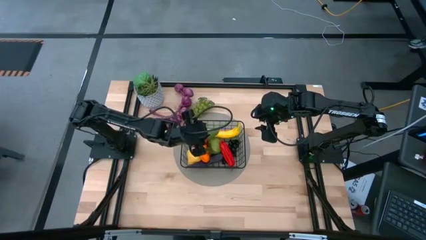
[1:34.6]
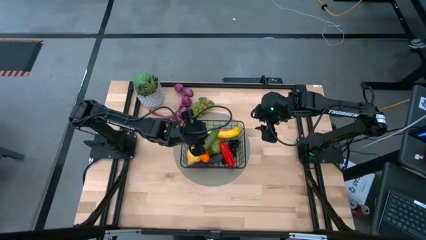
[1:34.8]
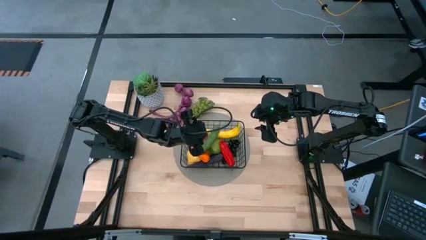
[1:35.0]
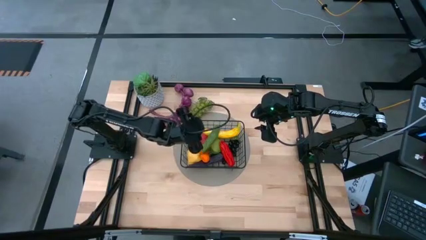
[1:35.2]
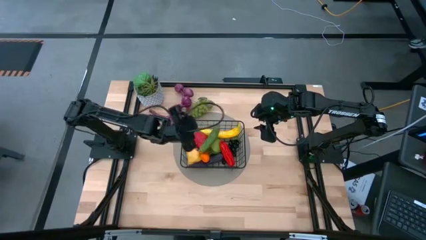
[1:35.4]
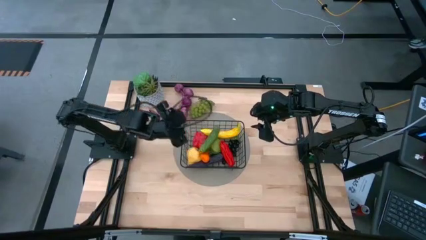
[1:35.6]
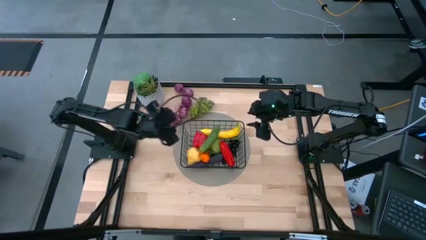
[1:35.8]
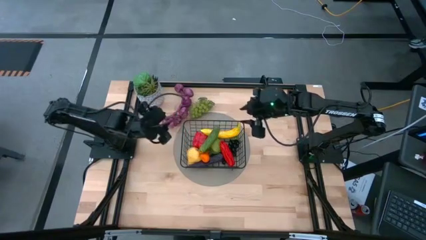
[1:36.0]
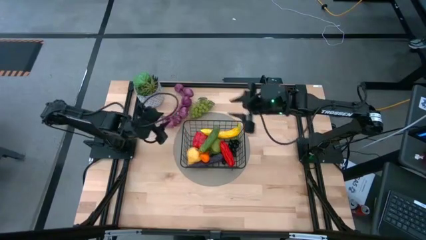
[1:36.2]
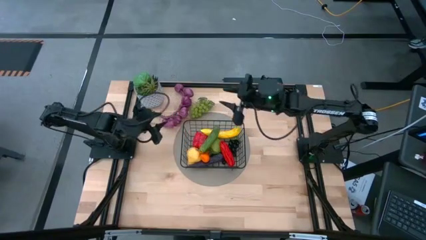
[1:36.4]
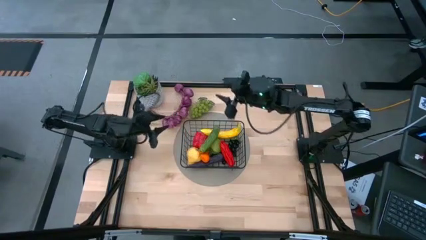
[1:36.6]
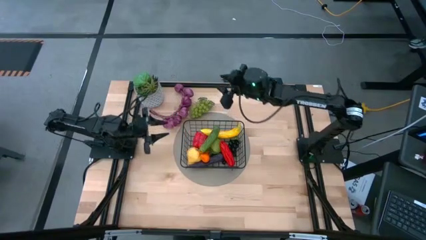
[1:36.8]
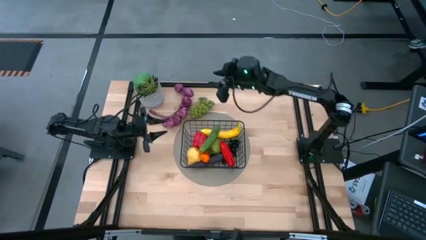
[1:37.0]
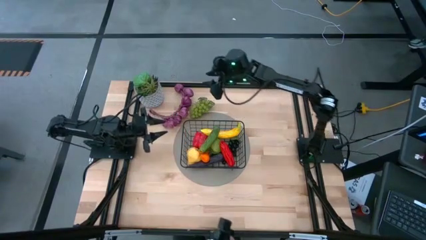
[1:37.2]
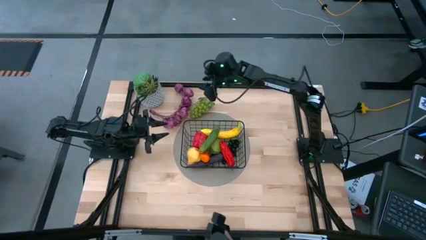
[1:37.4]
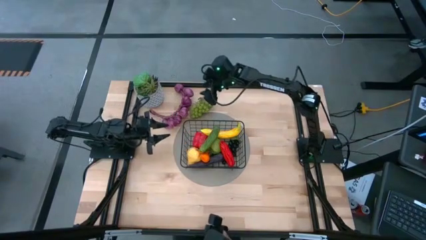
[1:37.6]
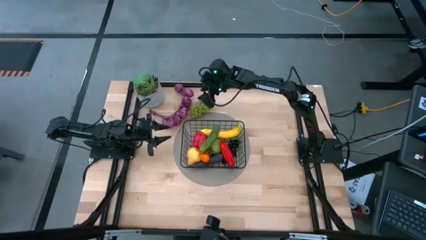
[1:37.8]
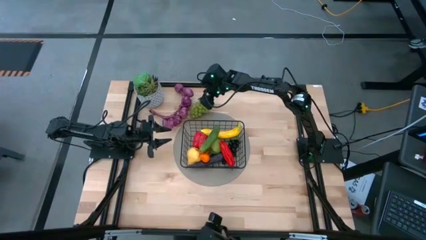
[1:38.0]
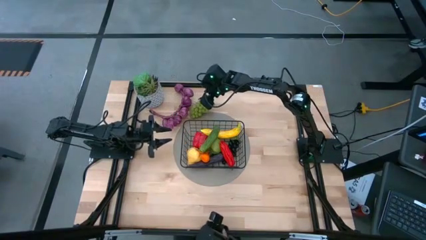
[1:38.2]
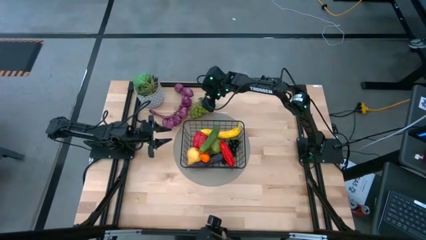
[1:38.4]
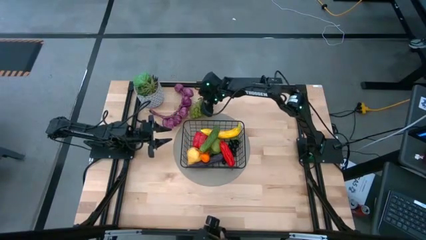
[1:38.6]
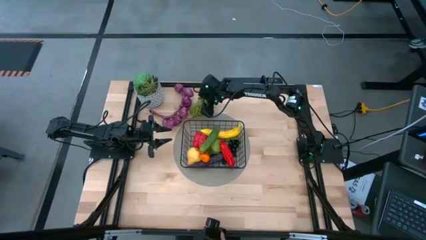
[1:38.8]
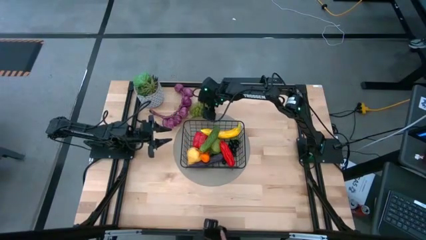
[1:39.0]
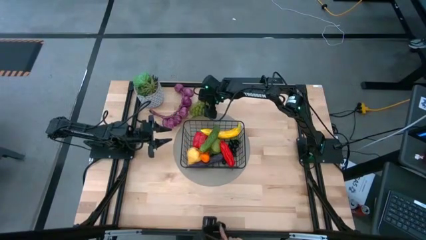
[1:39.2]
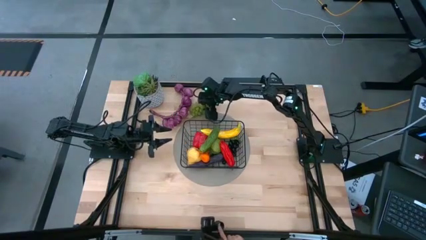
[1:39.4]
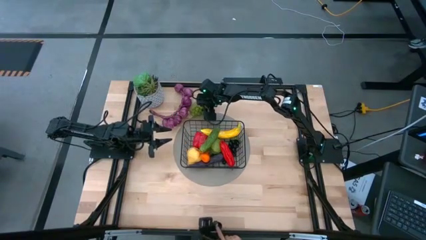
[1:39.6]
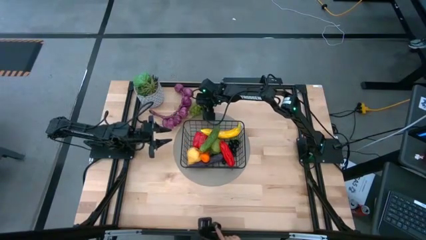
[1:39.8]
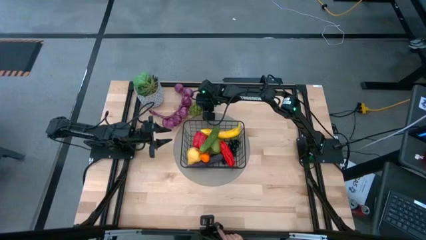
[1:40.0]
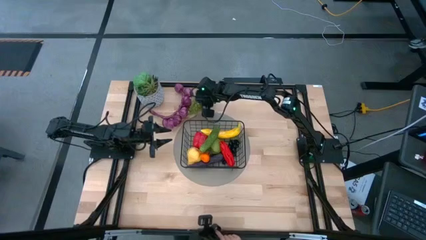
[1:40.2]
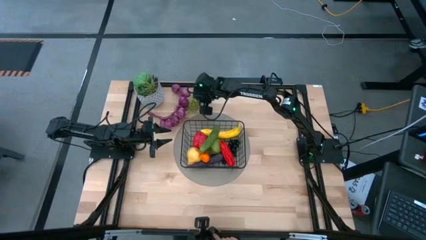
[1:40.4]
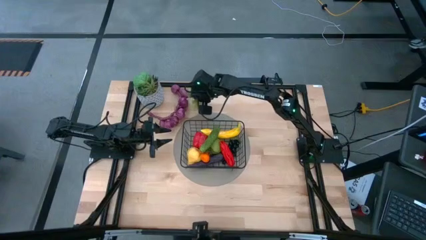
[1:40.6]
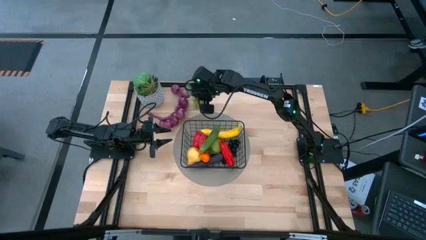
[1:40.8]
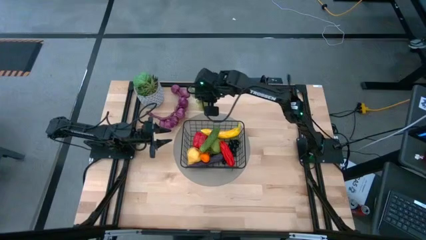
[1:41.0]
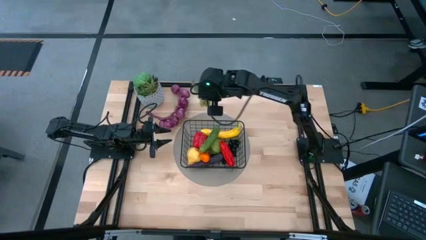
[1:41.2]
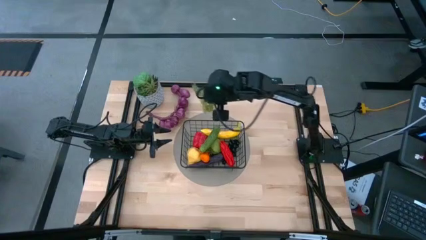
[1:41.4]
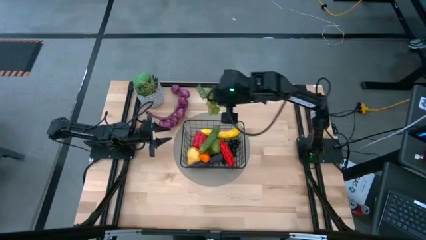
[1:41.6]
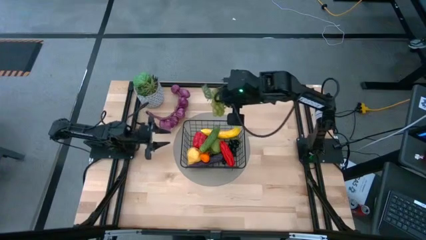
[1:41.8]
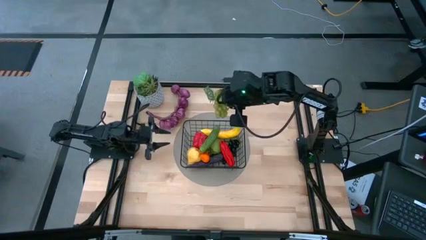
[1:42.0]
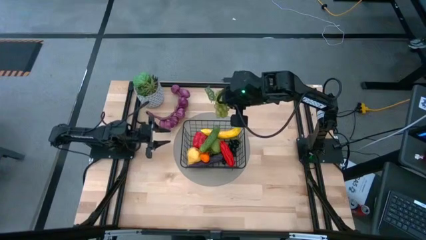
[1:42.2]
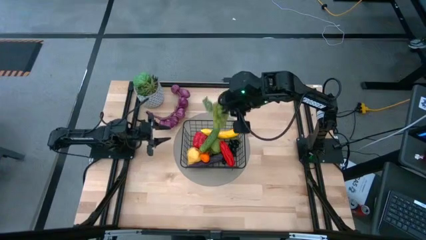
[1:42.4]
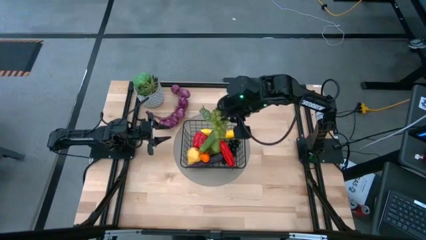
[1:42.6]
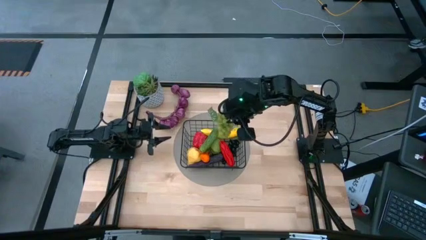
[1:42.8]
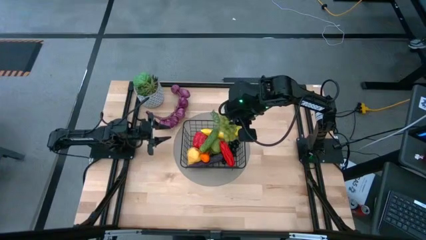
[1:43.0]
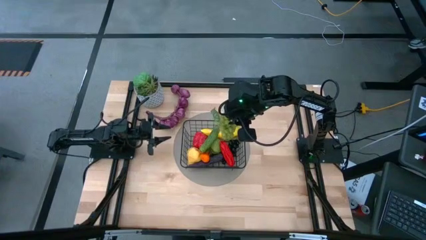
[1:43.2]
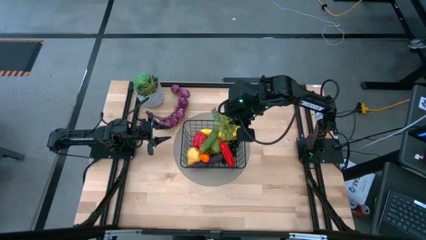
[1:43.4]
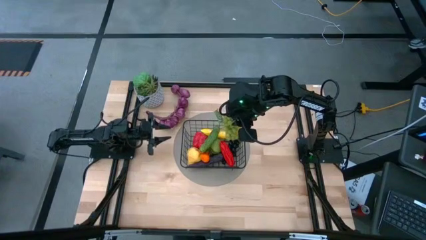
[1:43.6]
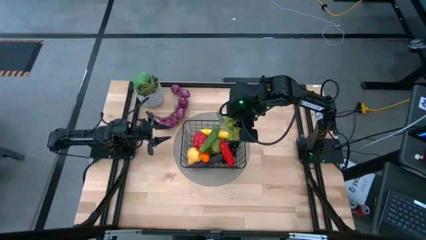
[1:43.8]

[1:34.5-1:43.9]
Task: Build produce basket
Put the green grapes into the black wire basket

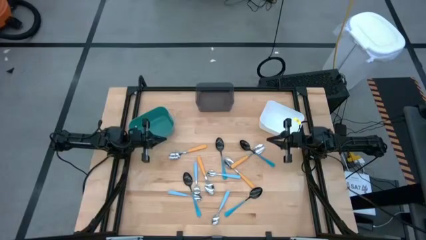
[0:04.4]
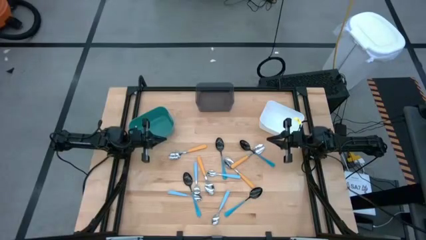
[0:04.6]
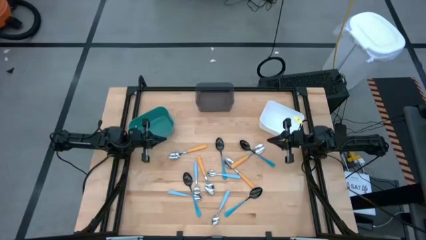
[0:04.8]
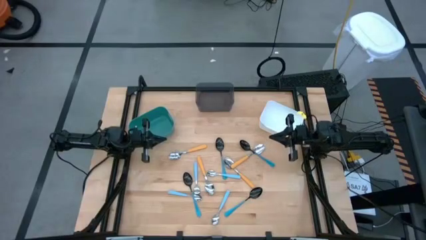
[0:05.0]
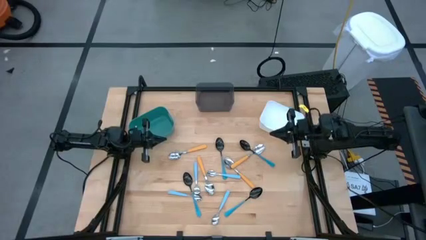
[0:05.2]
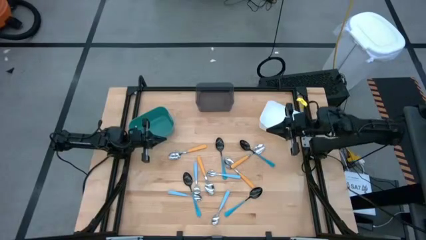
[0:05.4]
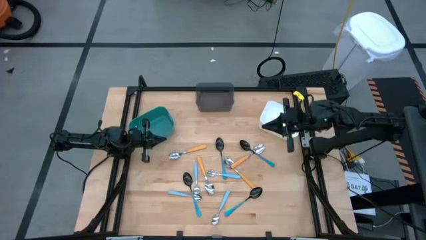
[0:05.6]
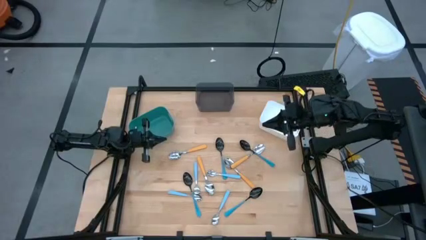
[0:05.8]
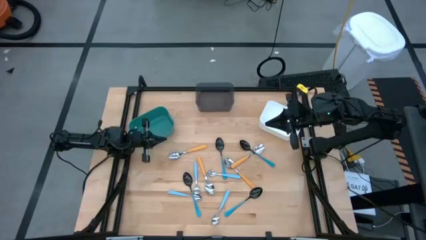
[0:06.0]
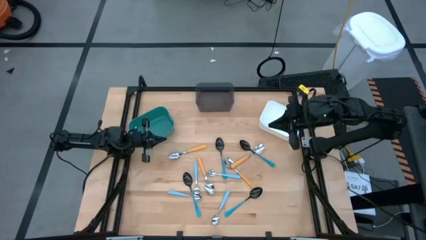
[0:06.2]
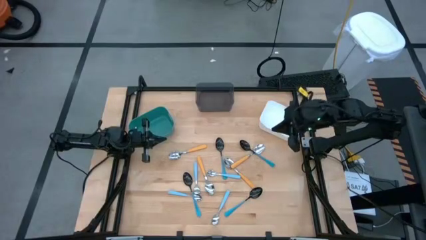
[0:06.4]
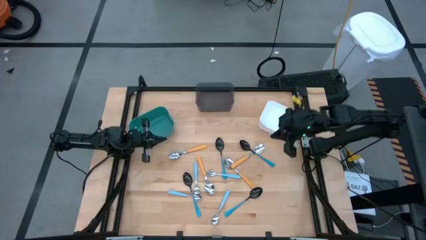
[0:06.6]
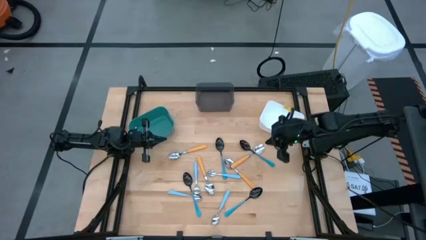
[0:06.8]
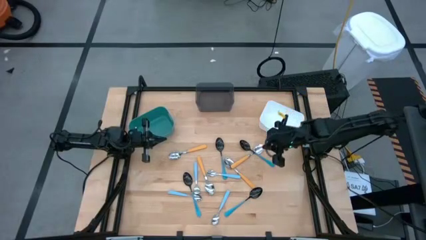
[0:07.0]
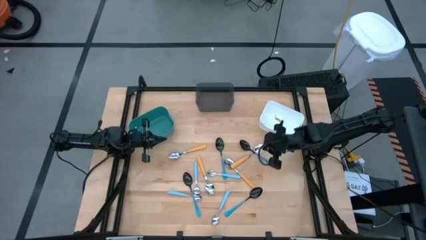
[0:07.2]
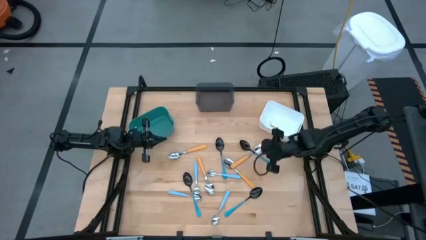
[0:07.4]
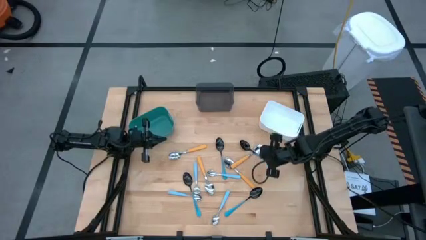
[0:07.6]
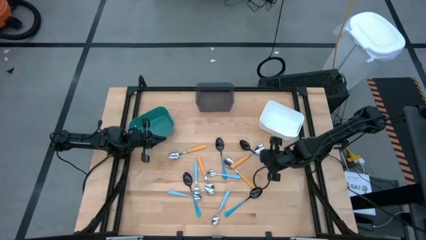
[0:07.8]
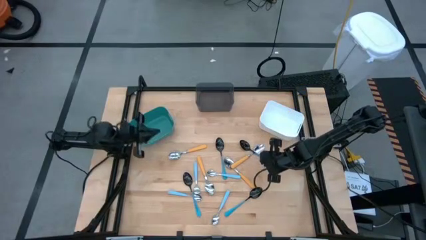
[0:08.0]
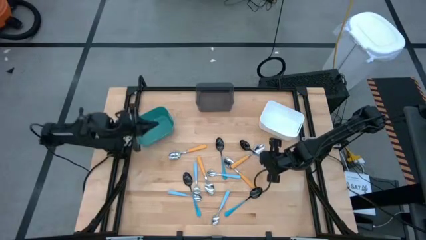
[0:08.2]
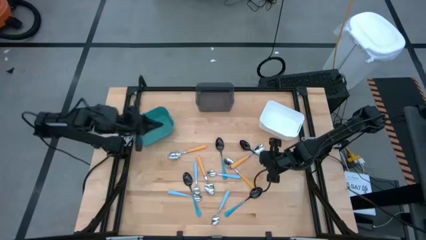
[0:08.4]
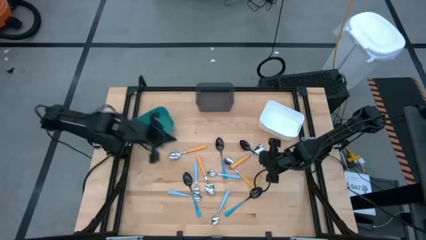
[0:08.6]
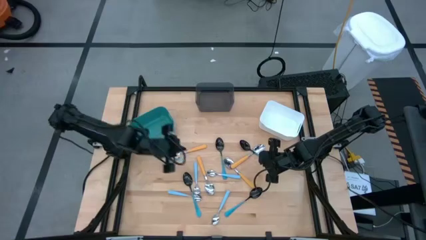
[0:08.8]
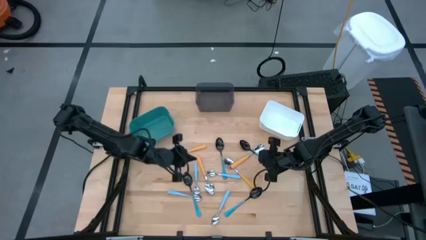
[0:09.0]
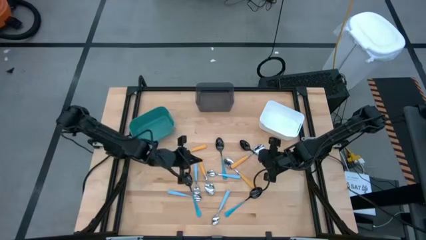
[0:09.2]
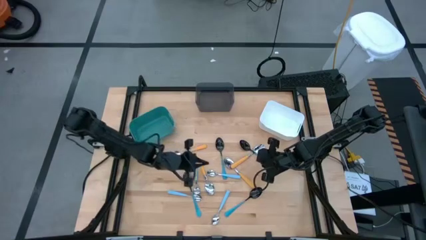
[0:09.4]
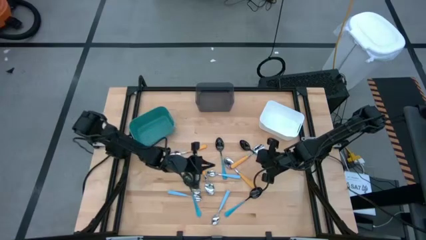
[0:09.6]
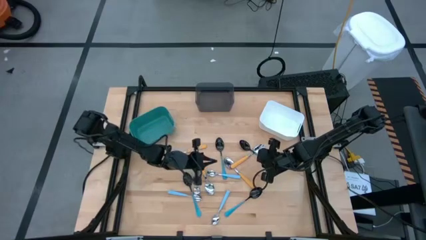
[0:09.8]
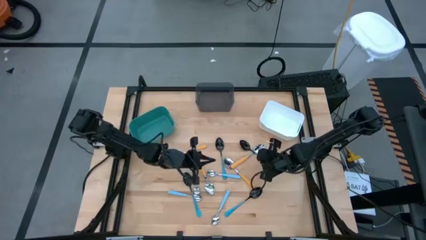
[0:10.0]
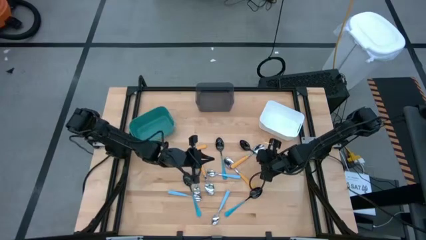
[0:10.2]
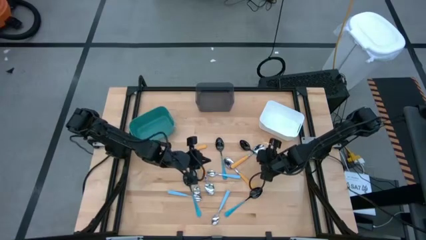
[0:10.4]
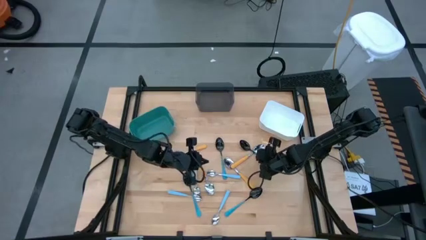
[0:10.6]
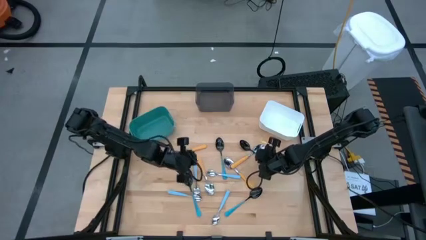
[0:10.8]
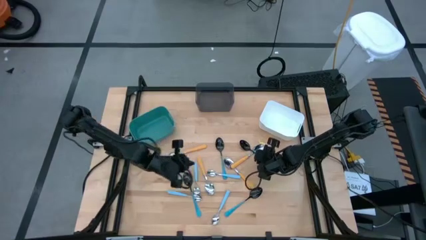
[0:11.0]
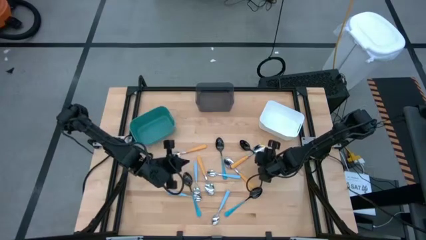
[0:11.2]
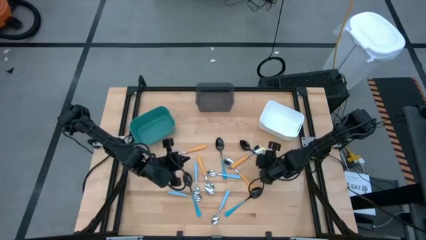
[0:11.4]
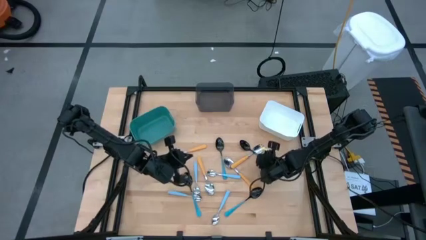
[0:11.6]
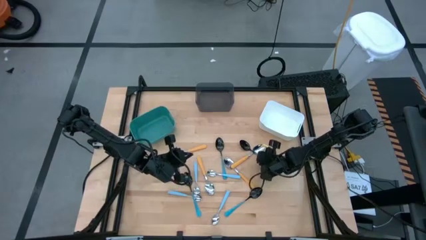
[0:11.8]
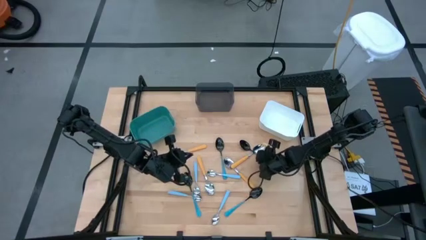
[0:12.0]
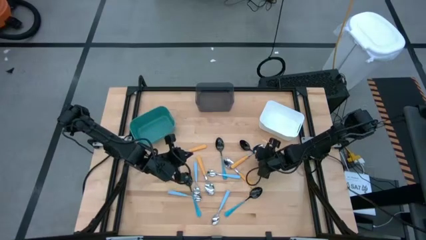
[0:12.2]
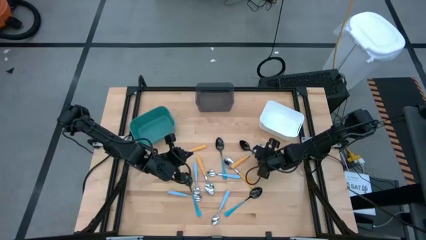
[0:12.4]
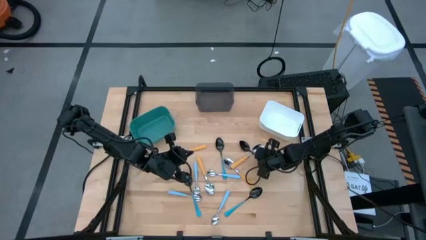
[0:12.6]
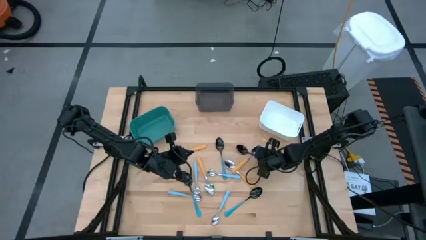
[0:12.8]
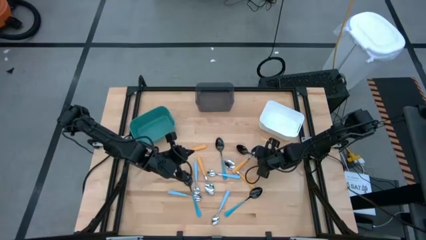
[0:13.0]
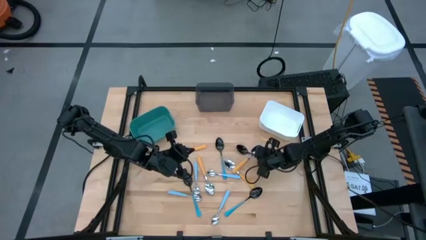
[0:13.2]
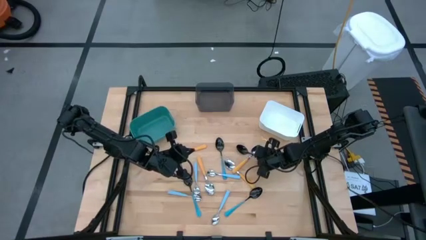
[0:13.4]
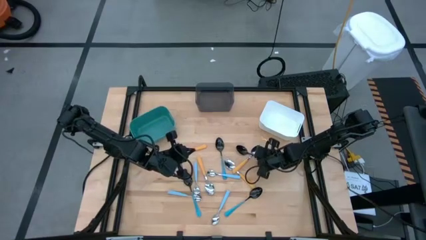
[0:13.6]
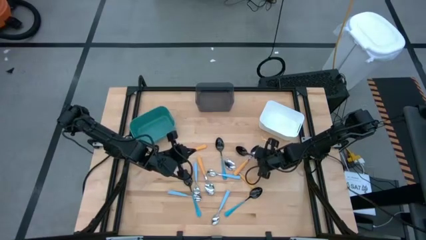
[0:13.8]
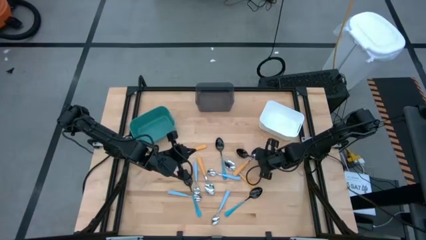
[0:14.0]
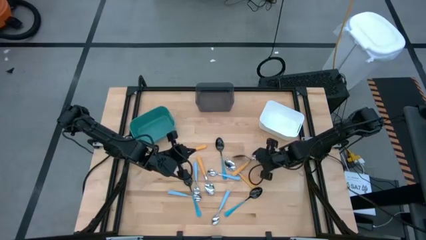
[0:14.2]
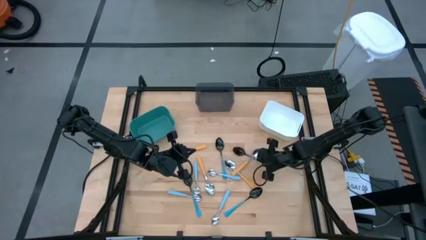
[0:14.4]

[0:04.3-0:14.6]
Task: Sort silverware by color (type)
Put the blue spoon into the white bin
